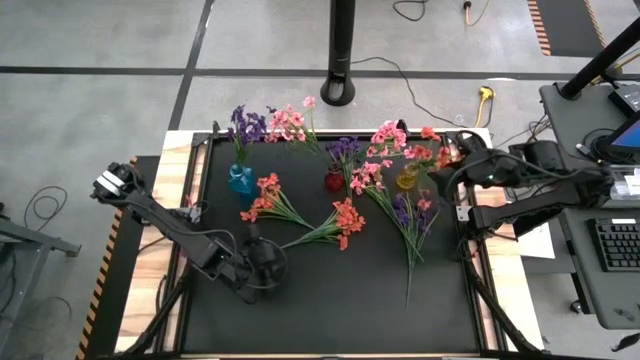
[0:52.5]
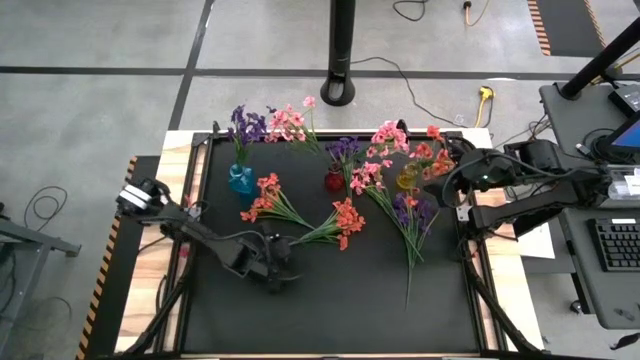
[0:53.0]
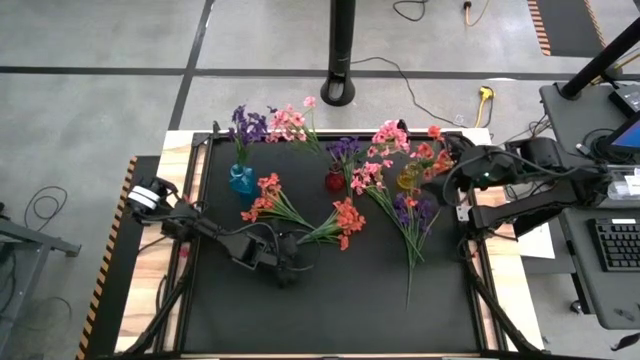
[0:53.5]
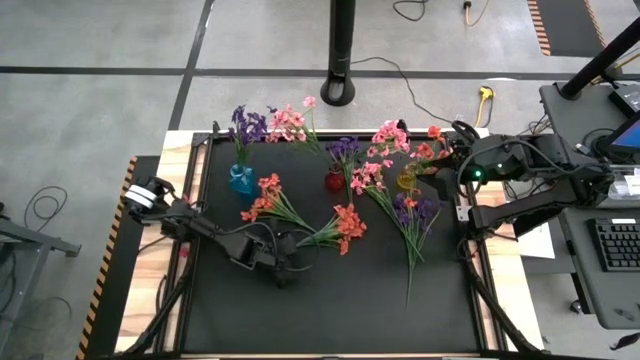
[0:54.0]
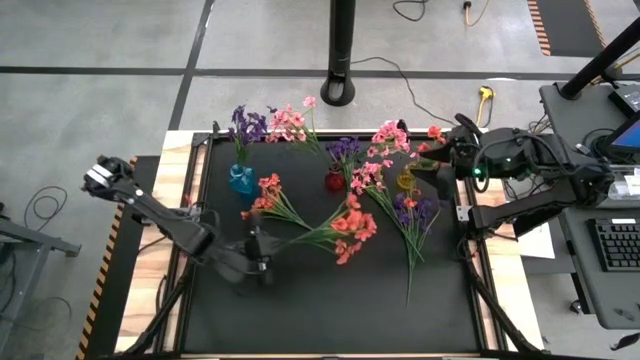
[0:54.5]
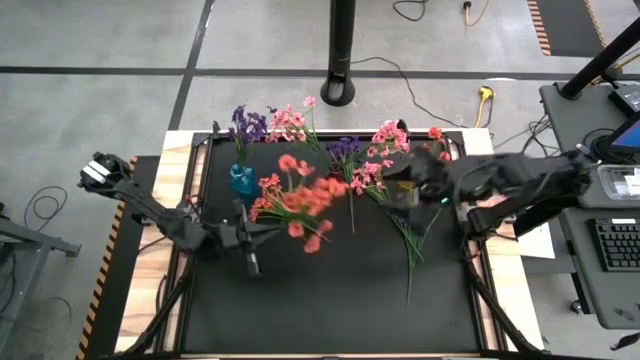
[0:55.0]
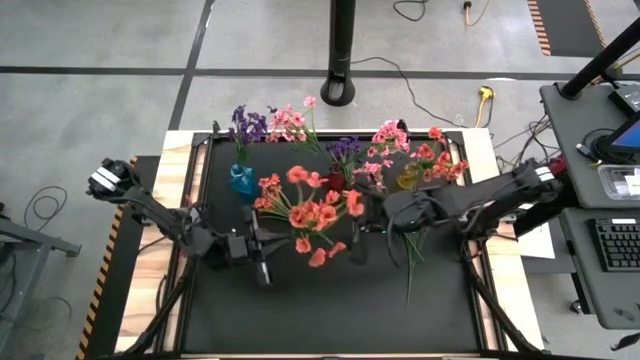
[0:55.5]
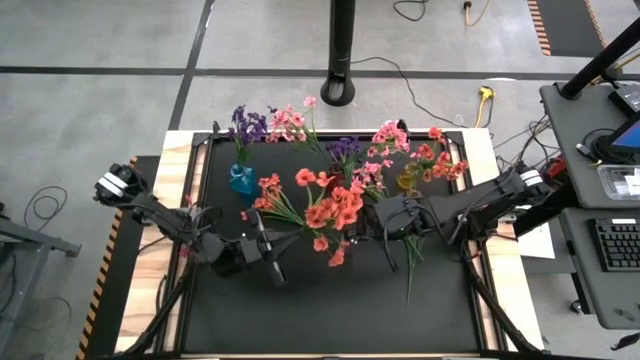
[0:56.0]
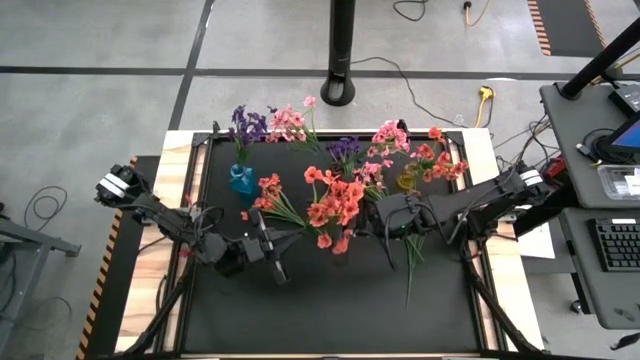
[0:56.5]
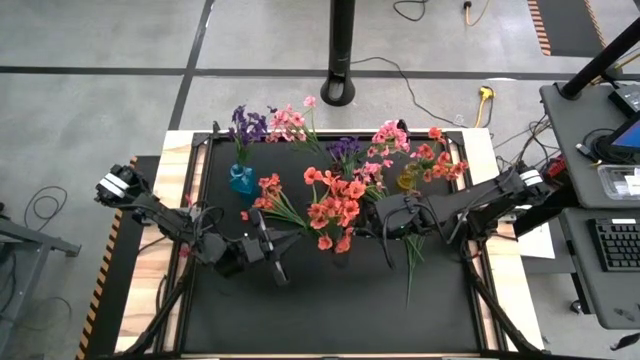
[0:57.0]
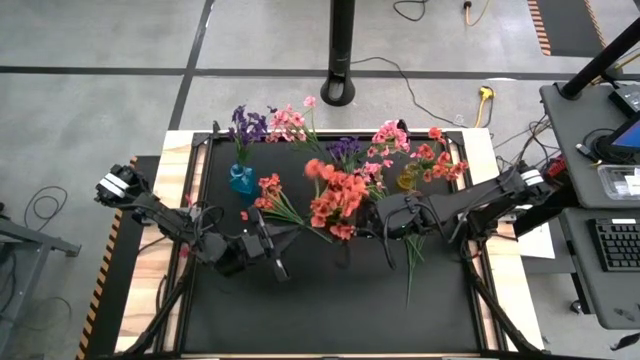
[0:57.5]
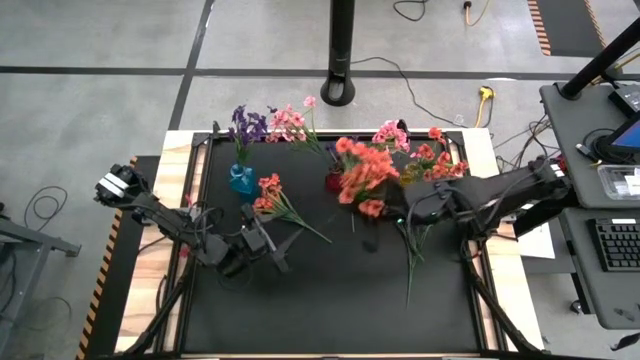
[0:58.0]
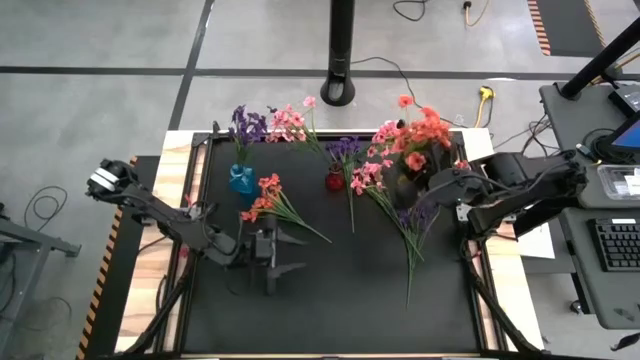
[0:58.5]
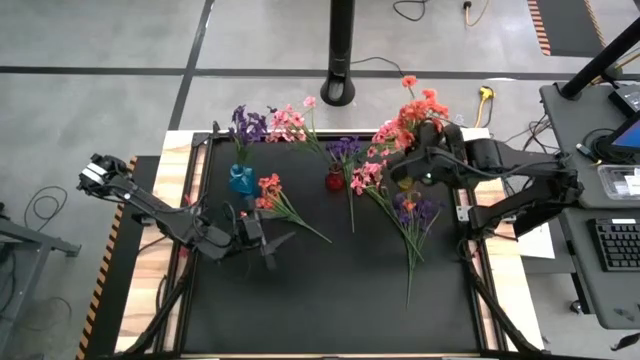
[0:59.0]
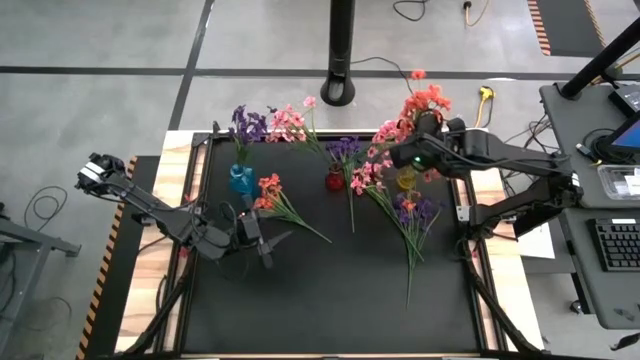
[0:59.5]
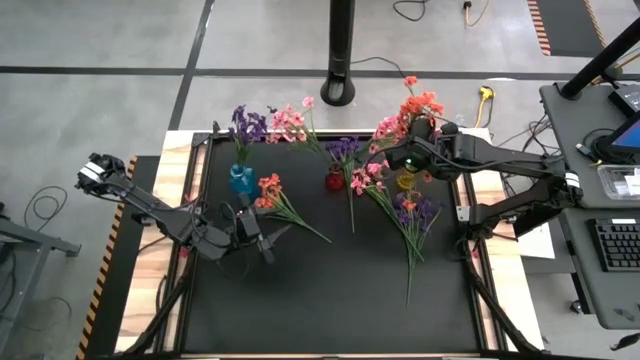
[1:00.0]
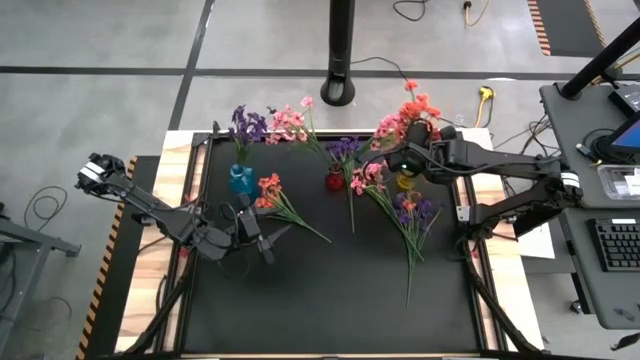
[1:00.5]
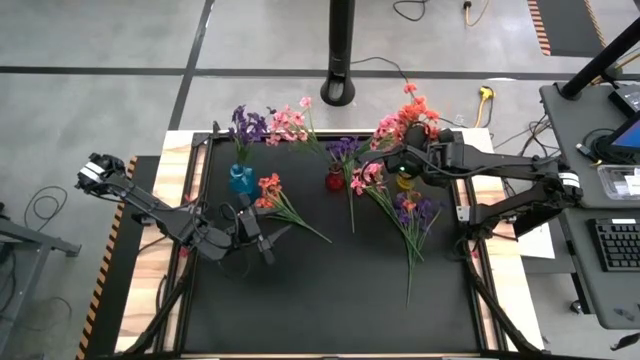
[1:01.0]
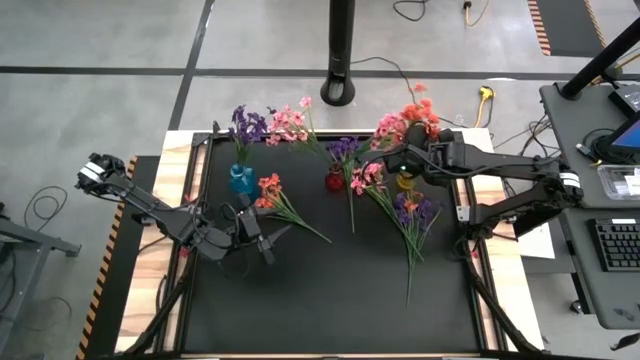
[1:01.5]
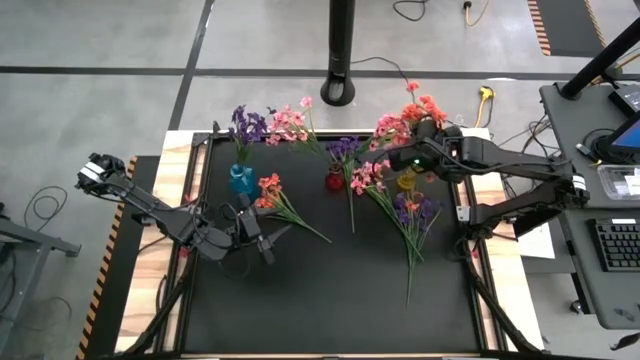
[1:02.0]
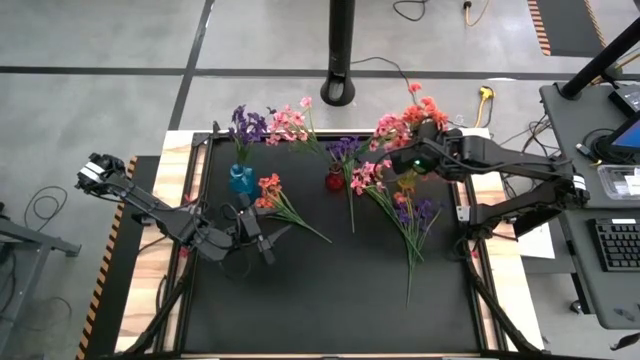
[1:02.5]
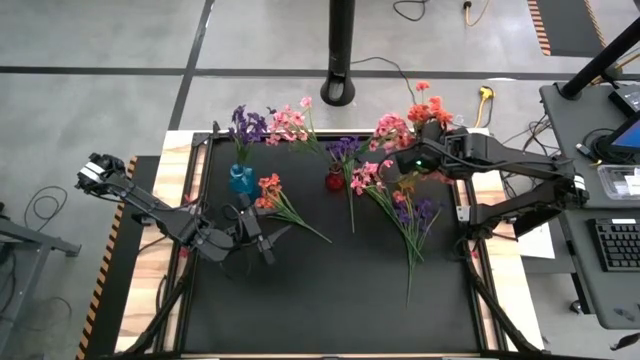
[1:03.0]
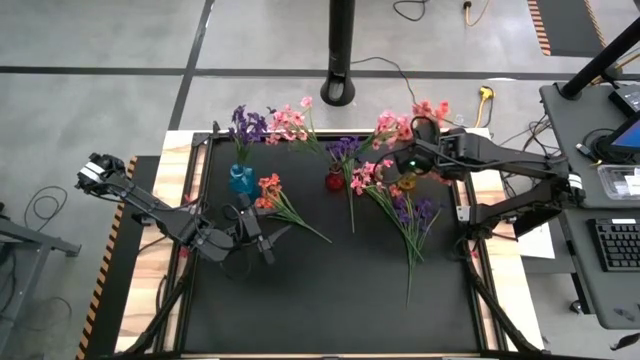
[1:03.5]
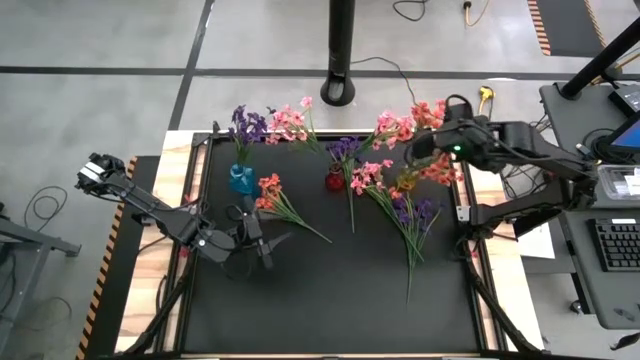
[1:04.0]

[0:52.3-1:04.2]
Task: Sort flowers into vase by color
Put the right orange flower into the yellow vase

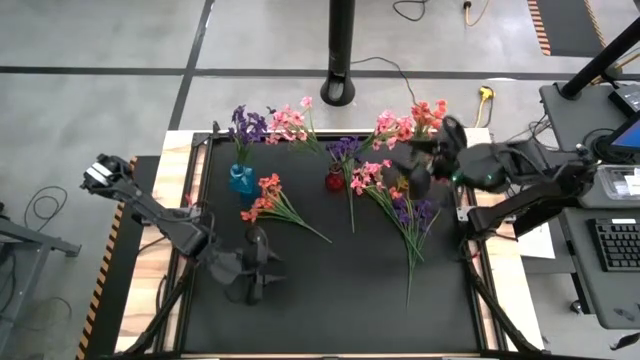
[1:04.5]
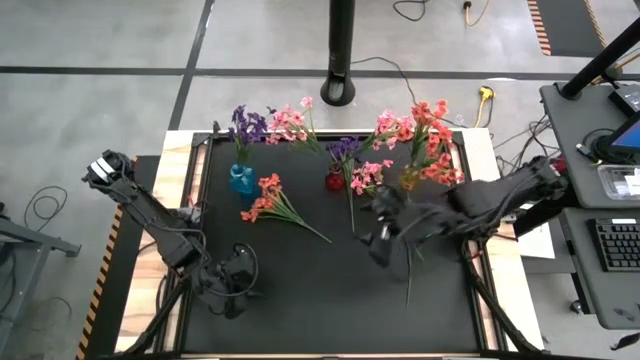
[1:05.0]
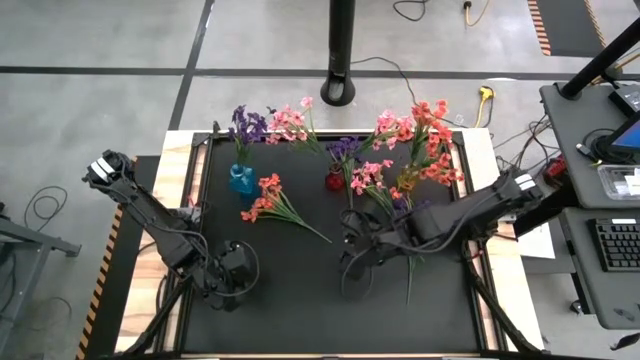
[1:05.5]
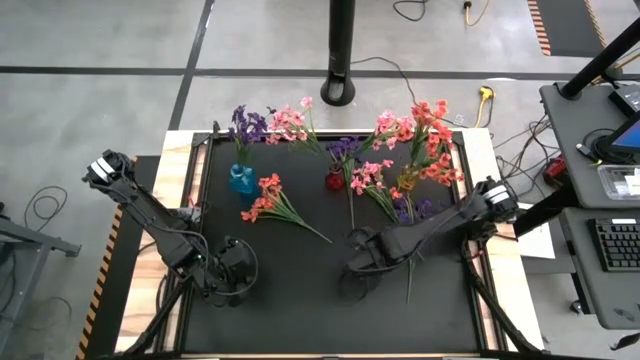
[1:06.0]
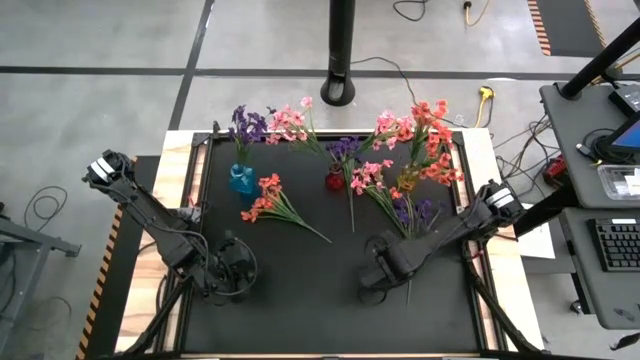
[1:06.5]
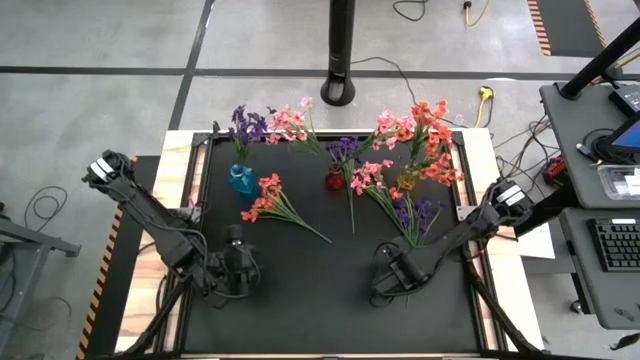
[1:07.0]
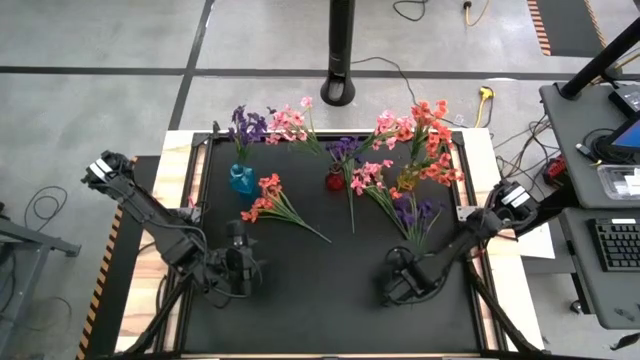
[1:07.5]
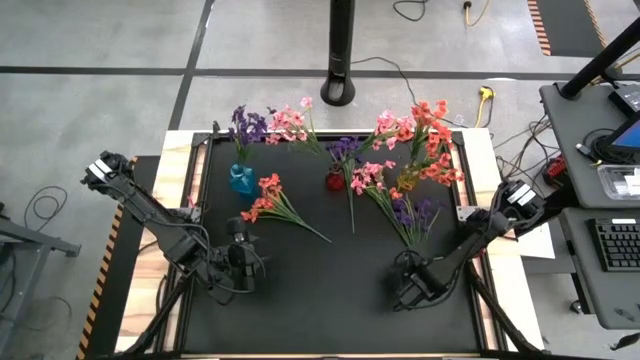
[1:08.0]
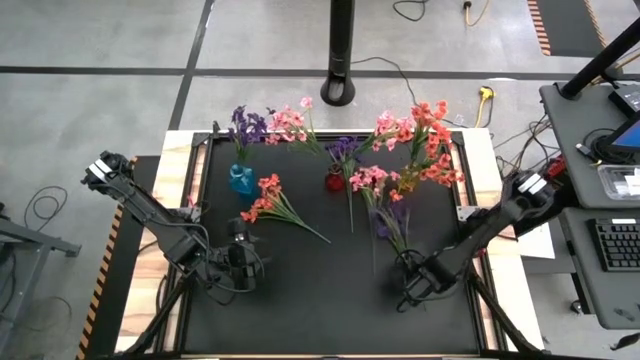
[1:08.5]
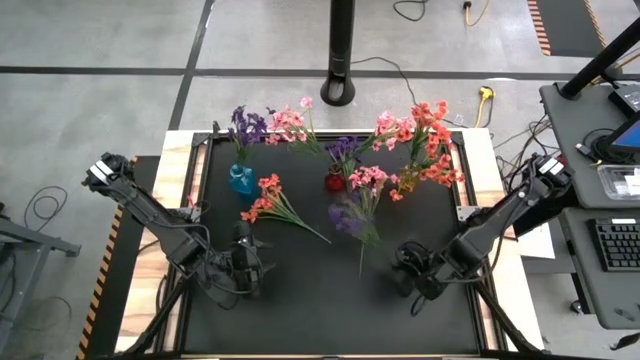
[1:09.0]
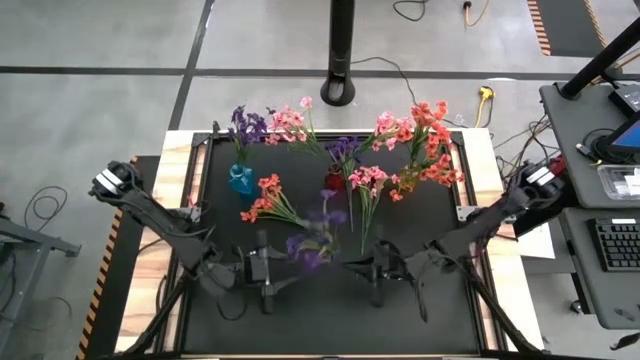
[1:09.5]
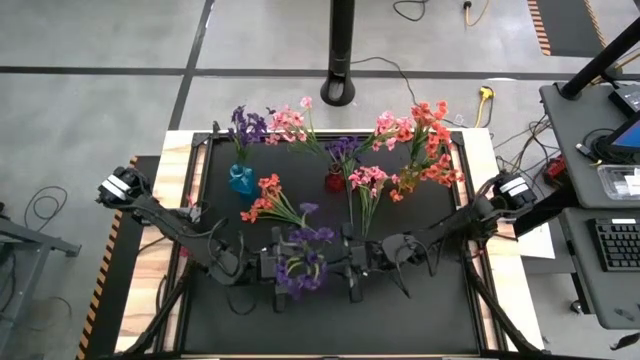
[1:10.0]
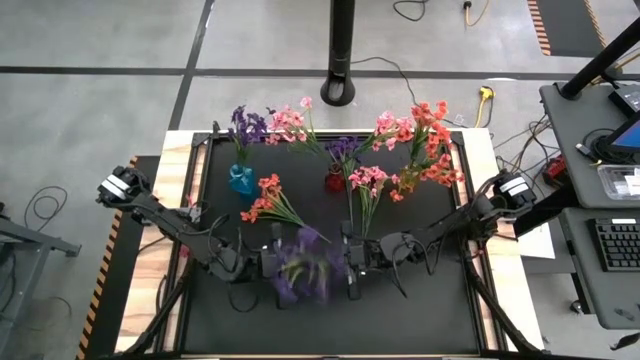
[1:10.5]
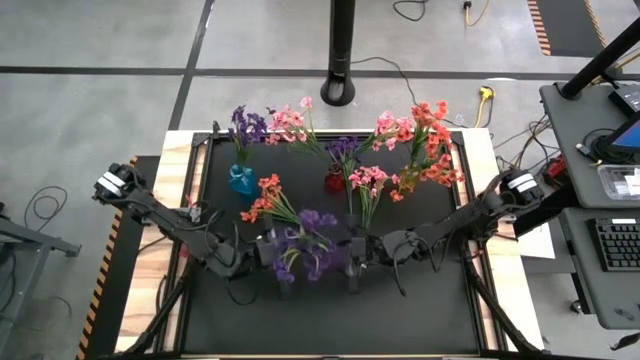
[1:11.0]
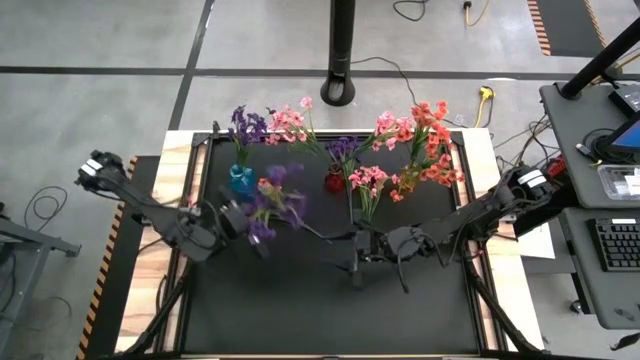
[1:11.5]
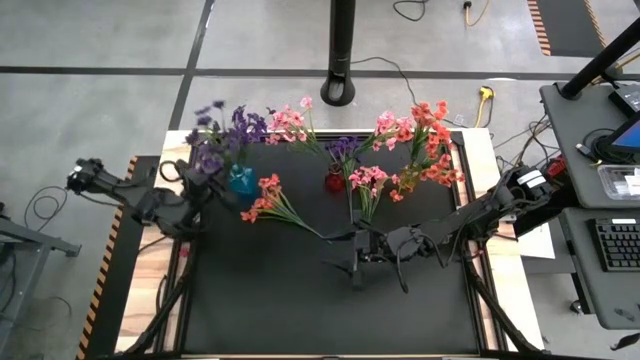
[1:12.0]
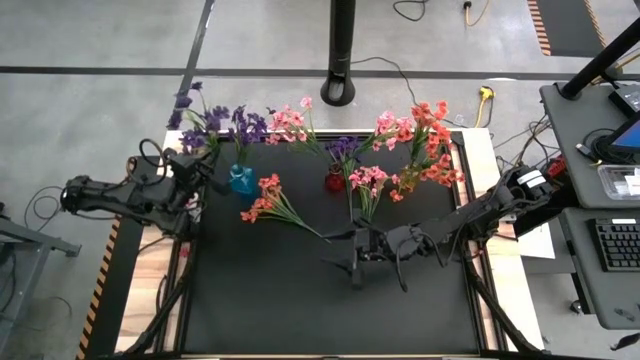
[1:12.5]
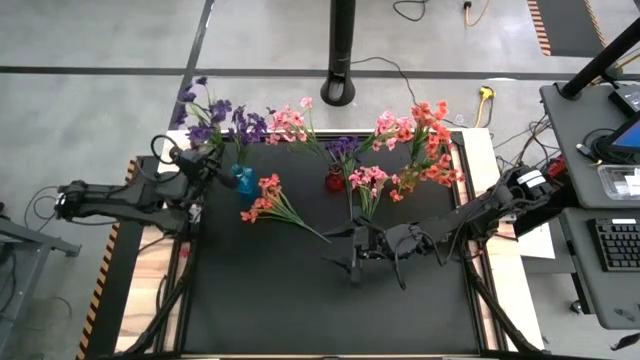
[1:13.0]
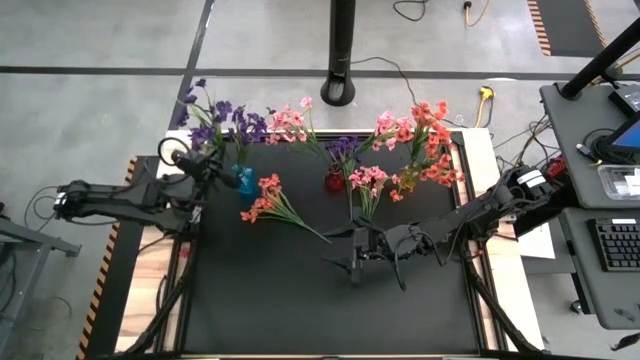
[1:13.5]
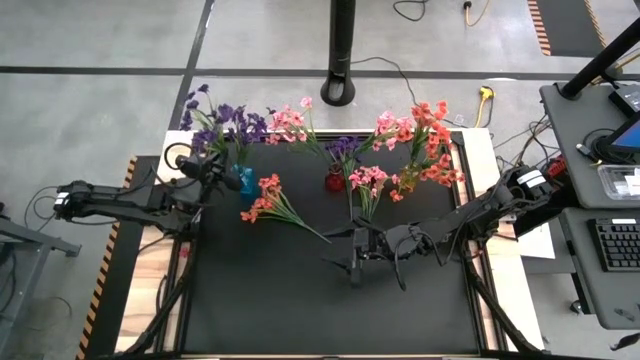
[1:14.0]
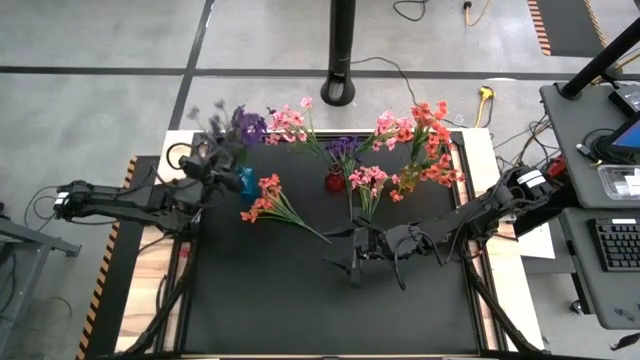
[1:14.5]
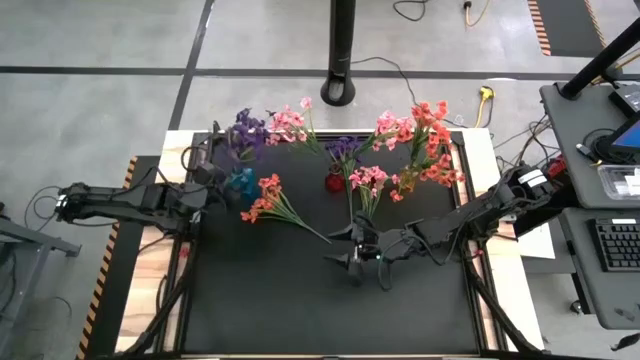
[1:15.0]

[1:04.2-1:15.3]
Put the bottom right purple flower into the blue vase
